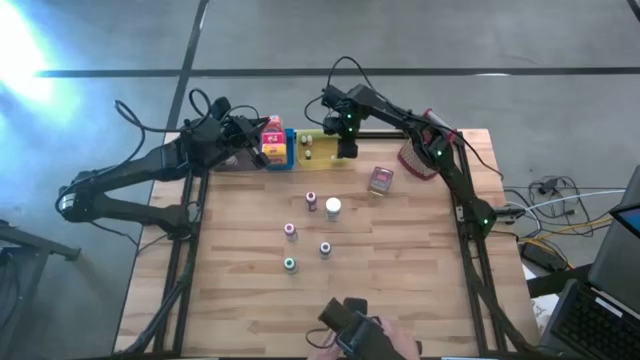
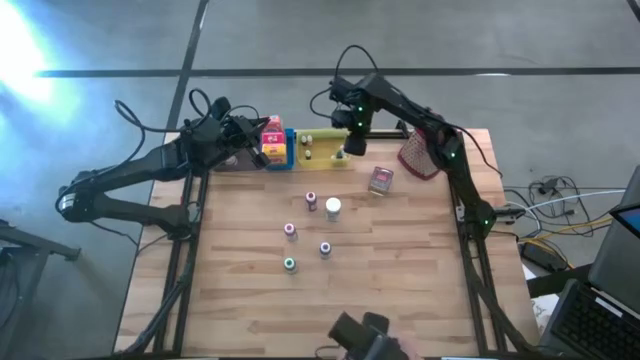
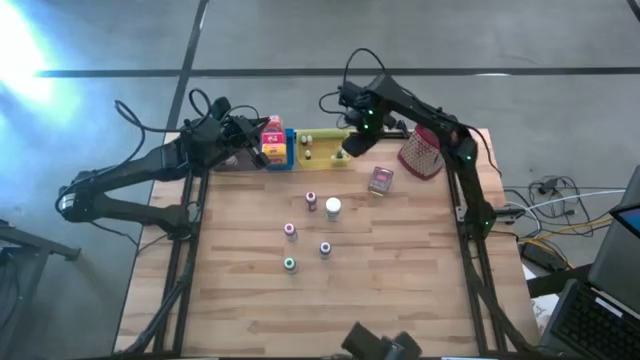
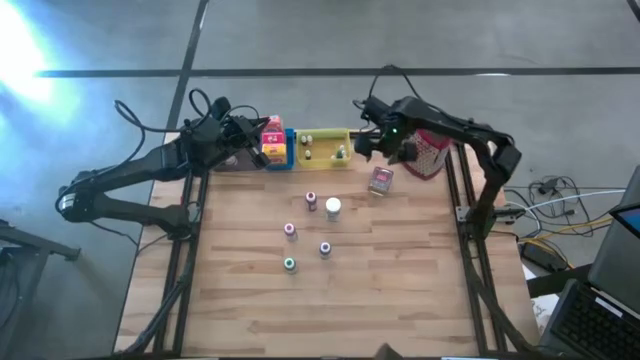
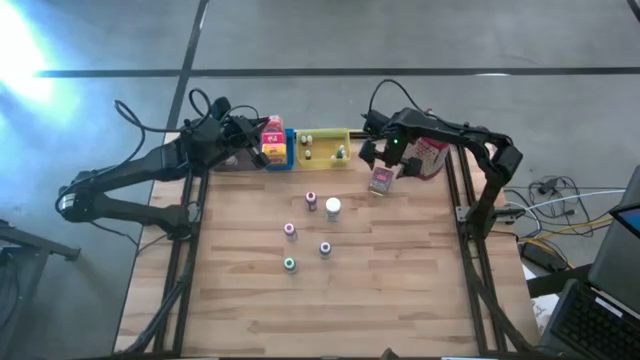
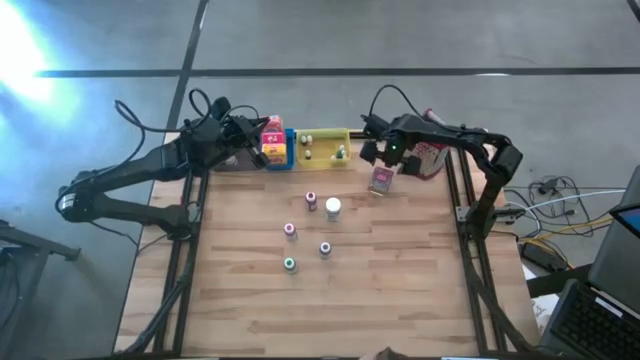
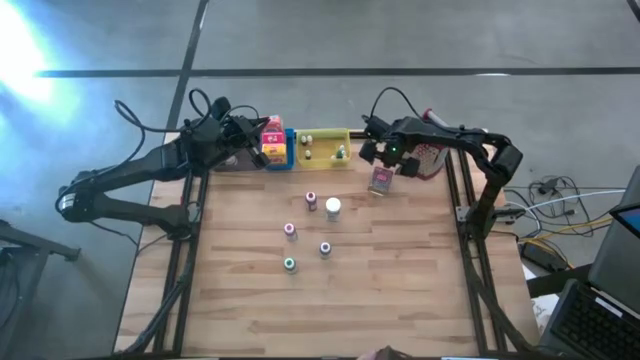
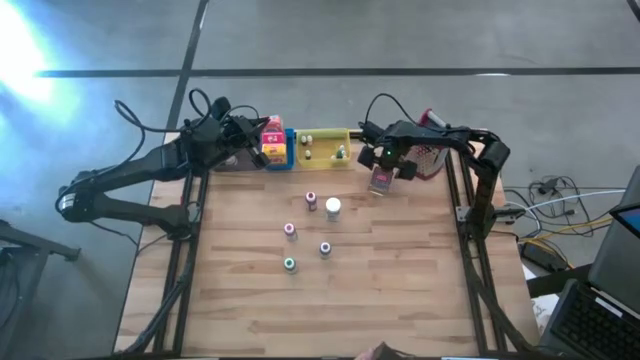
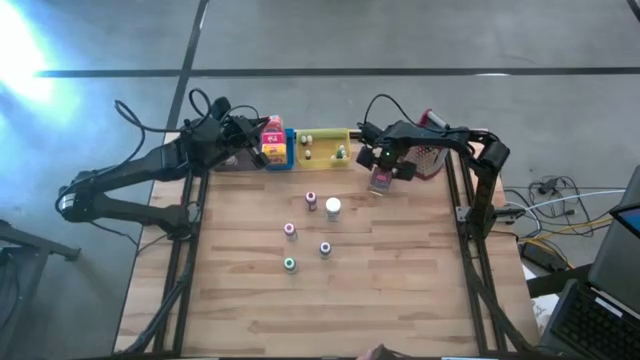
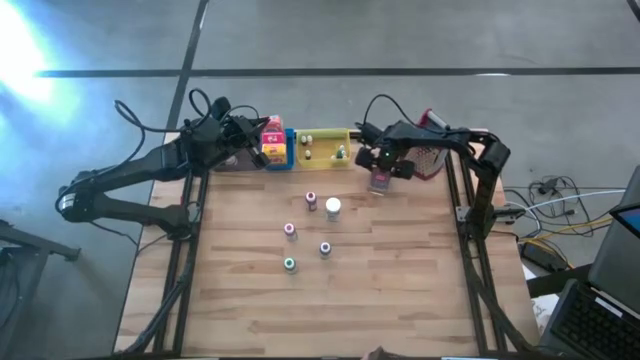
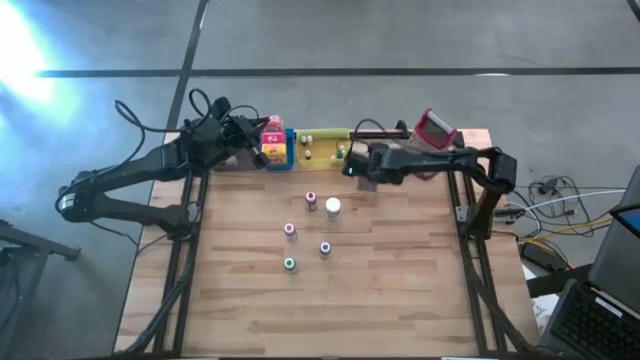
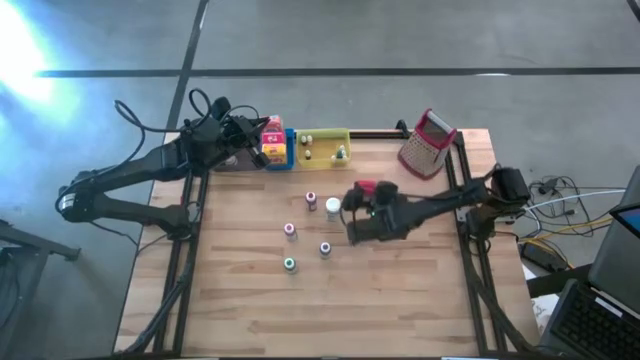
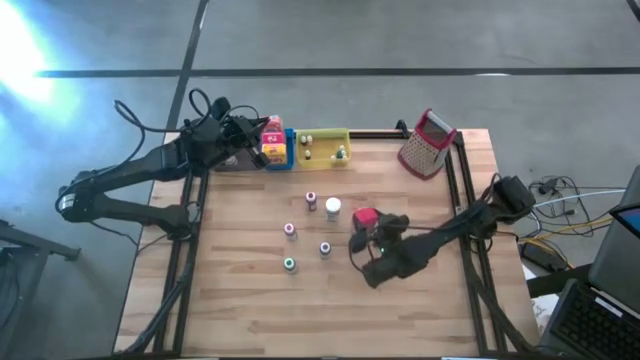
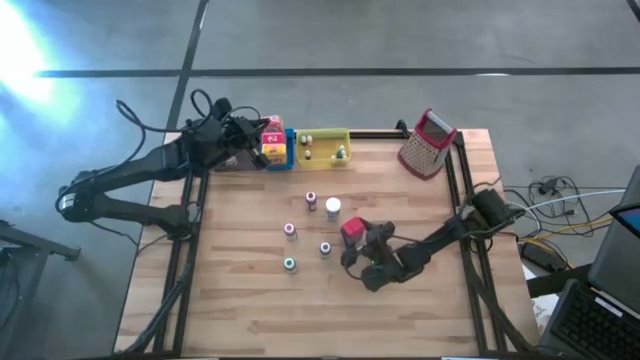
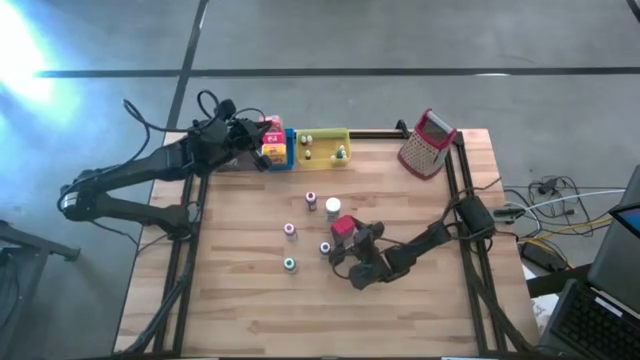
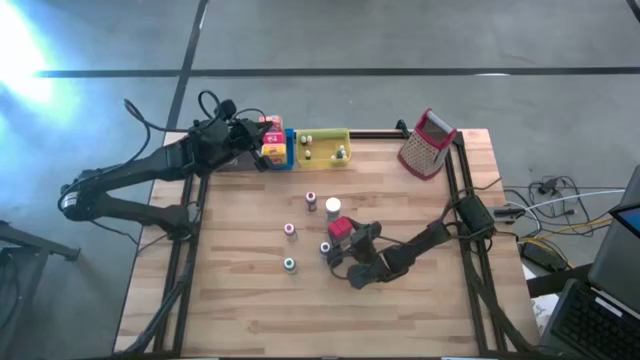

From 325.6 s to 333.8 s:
Task: Pick & Place Kitchen Items
Move the red seasoning bottle to the center of the table

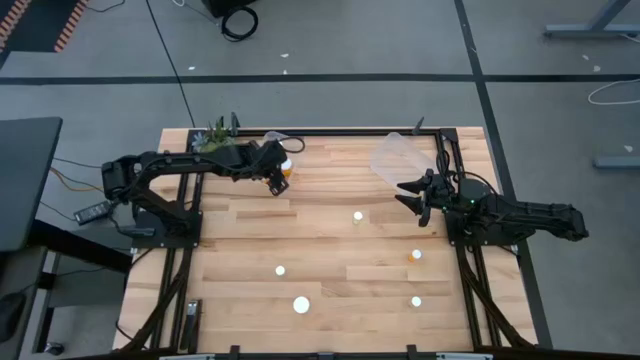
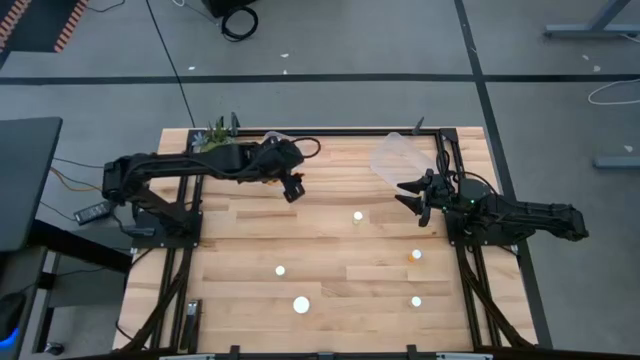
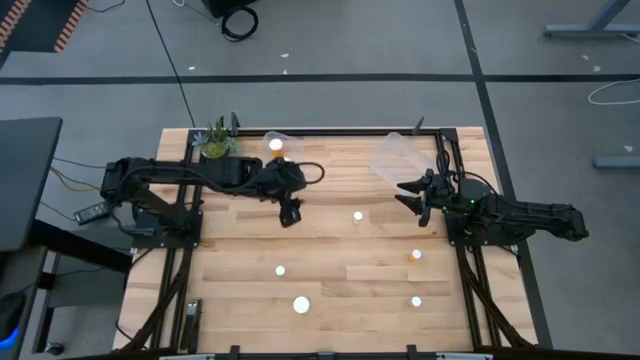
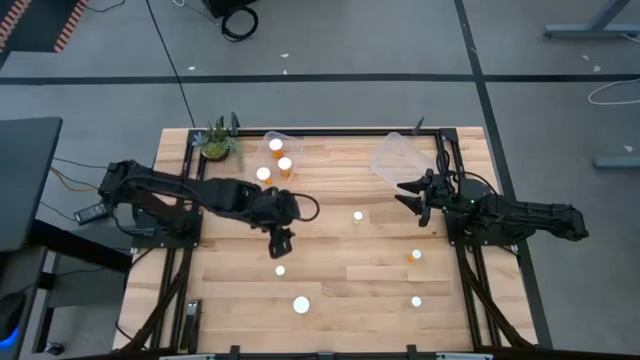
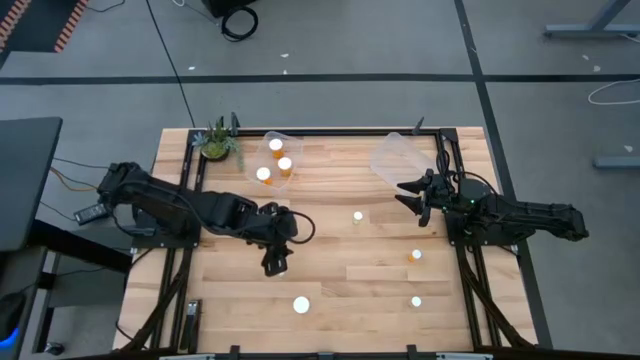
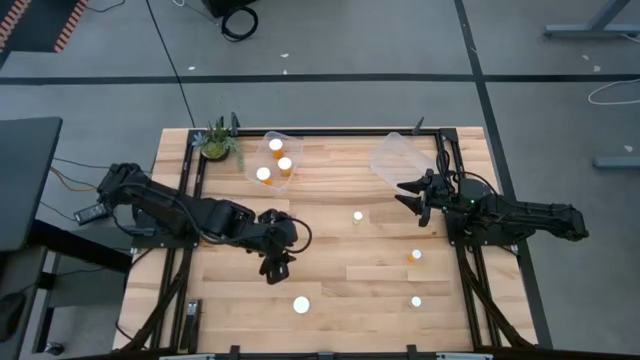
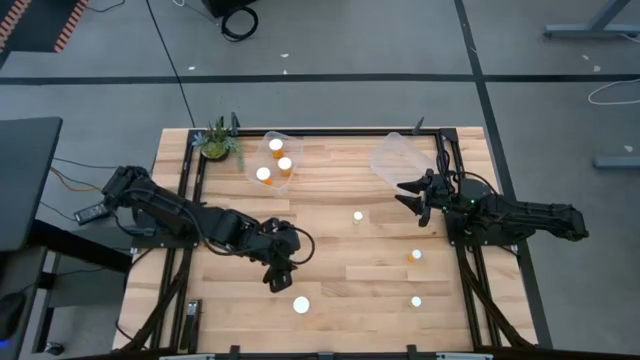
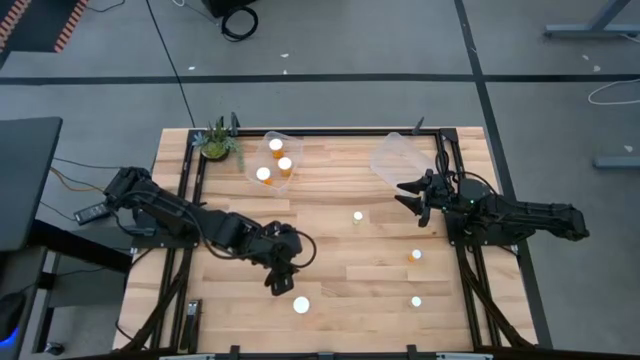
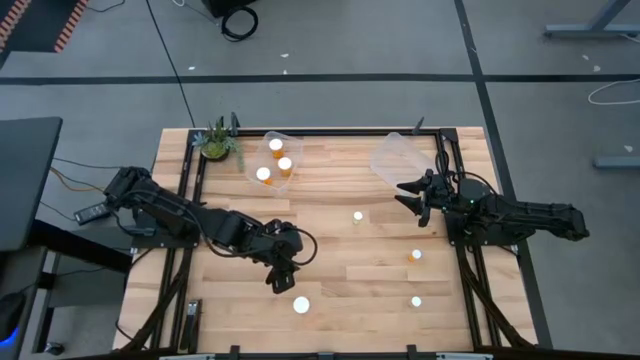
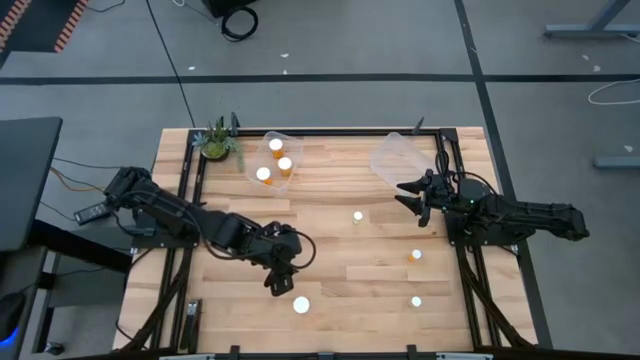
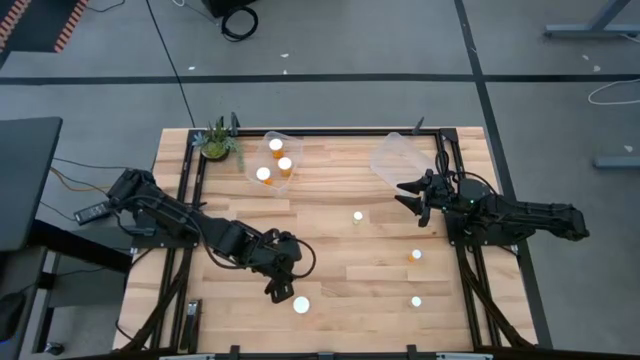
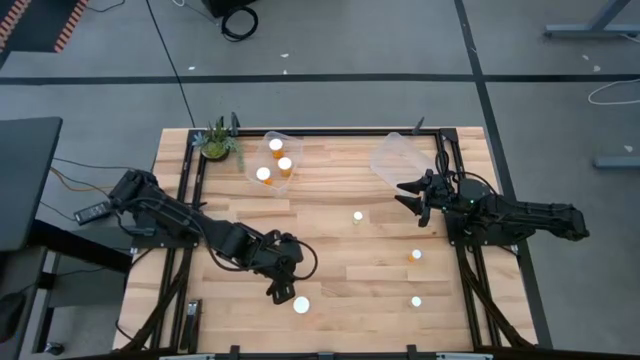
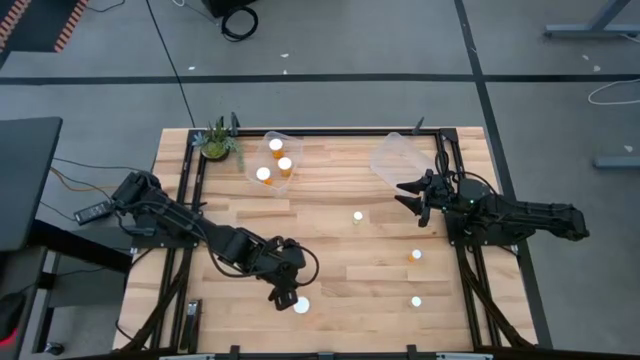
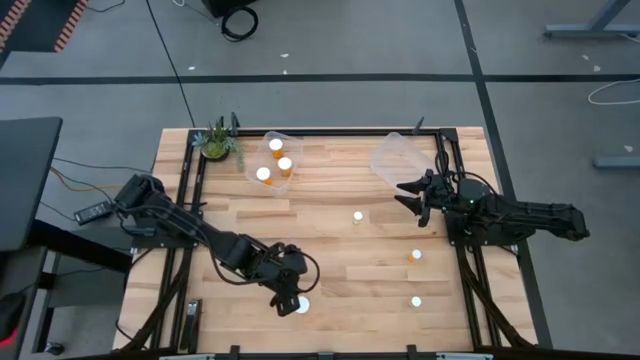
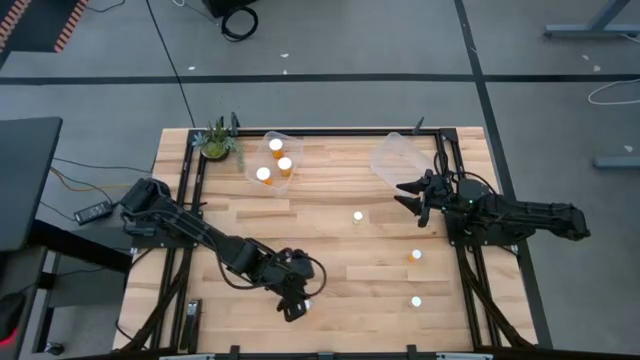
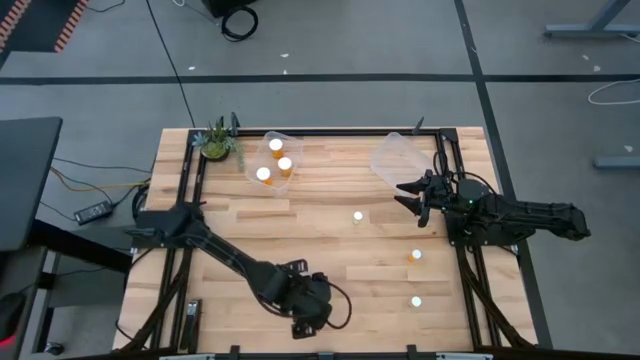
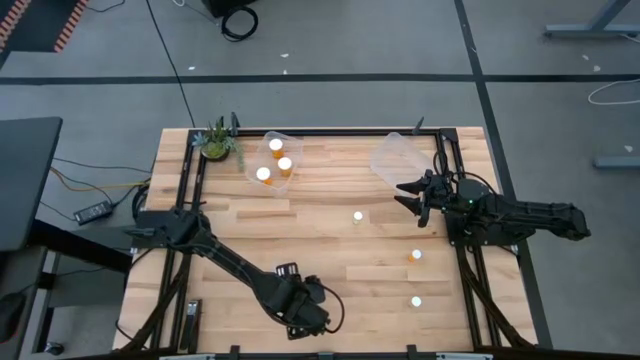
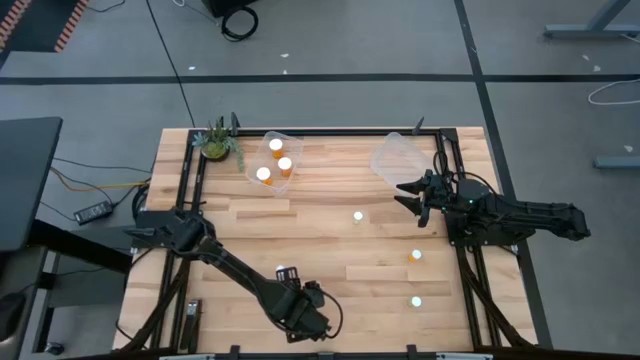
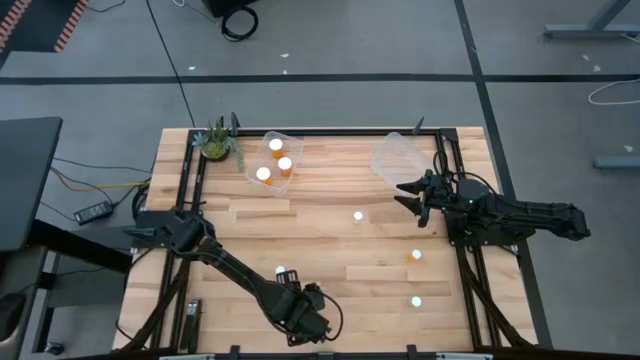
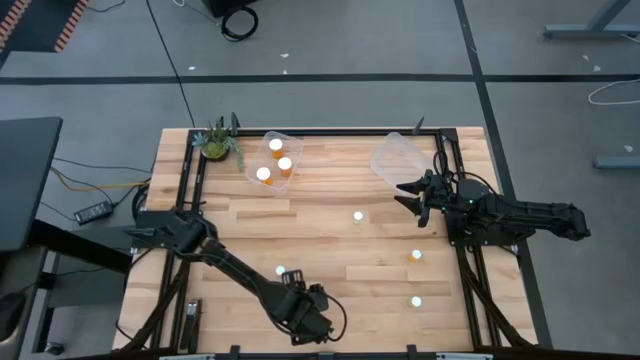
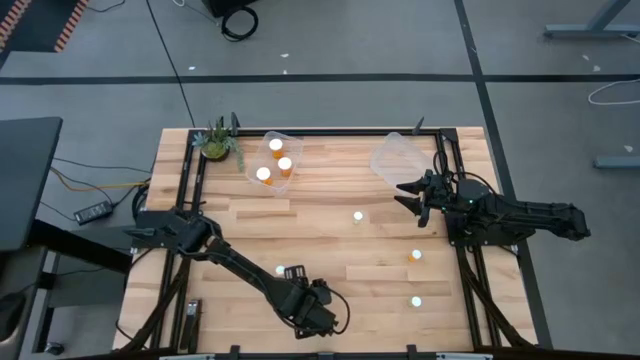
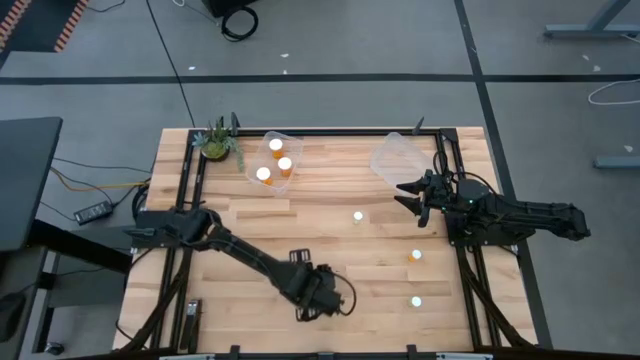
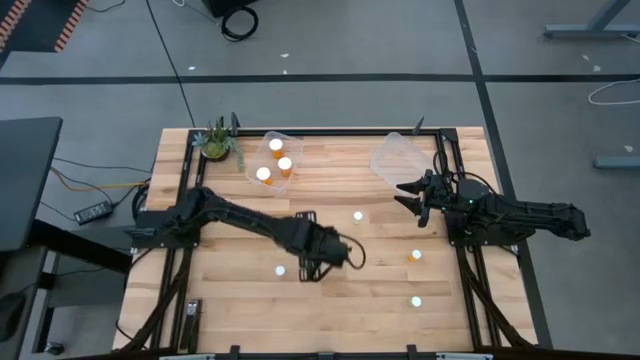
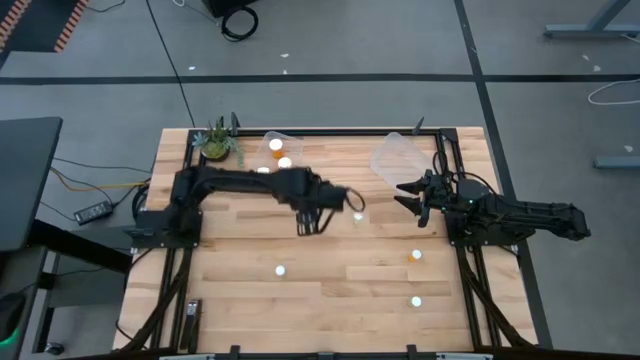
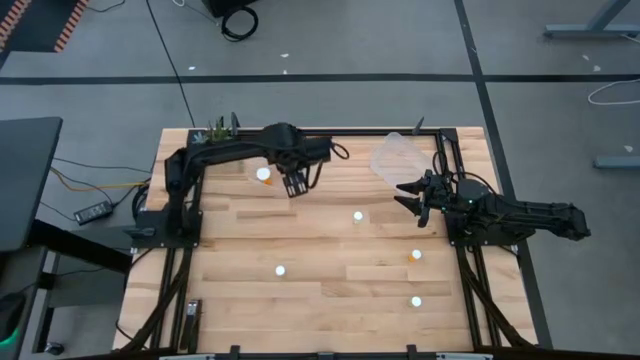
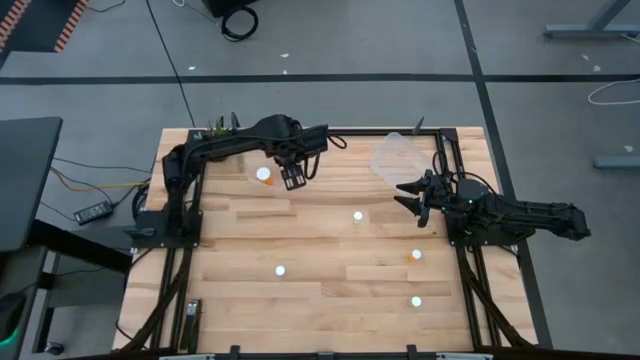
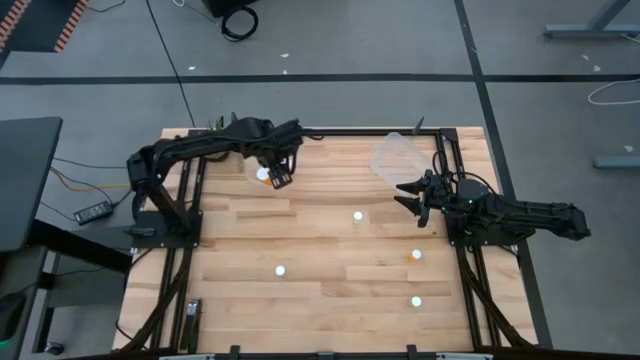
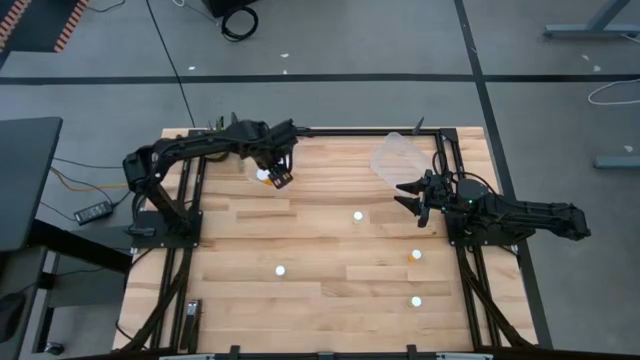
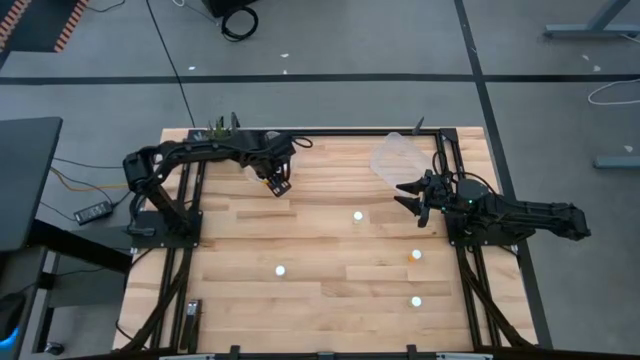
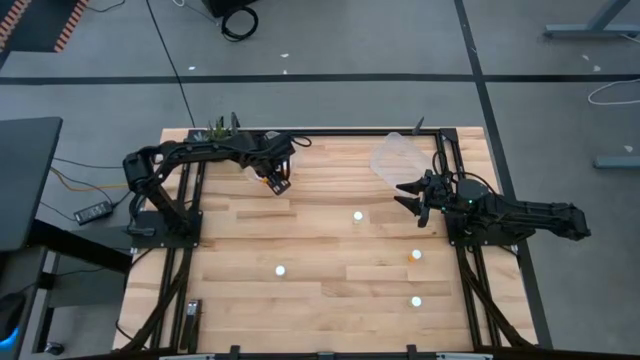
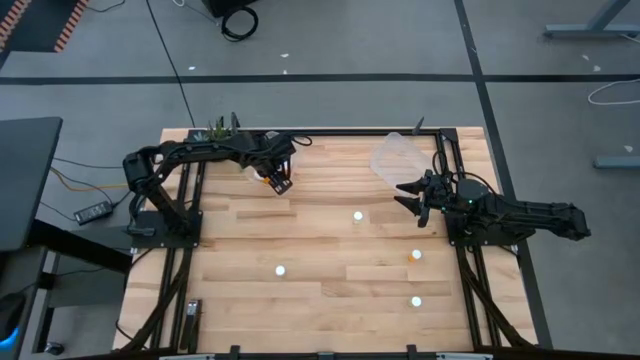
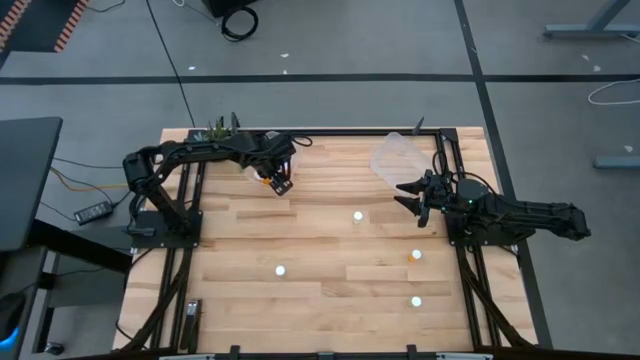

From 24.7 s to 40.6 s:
Task: Pick and place medicine bottles into bin by pill shape (circle, oval)
Put the large orange pill bottle into the left transparent bin
